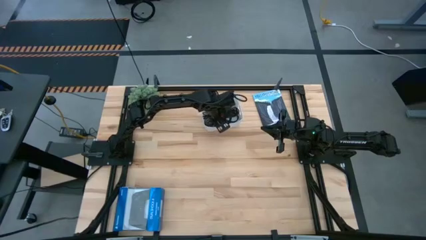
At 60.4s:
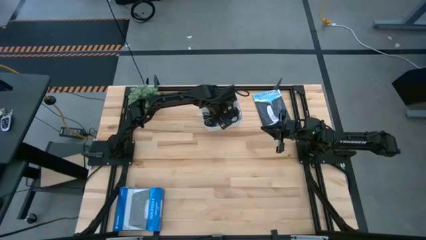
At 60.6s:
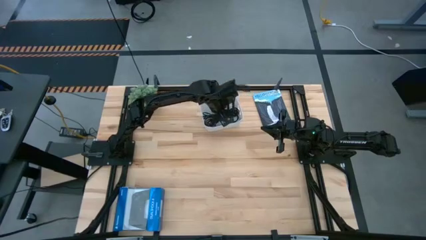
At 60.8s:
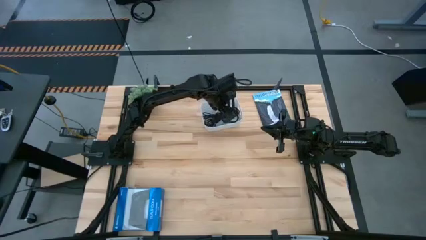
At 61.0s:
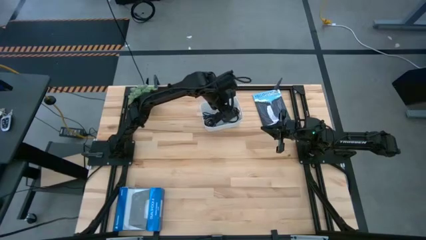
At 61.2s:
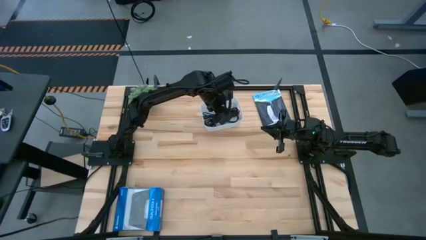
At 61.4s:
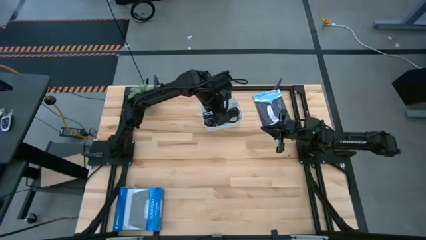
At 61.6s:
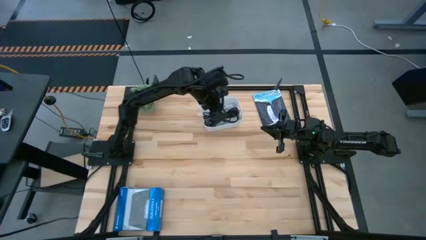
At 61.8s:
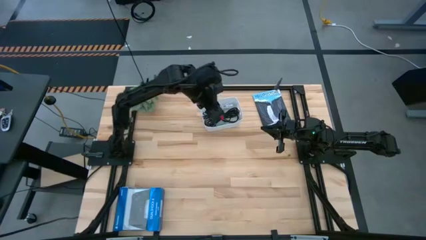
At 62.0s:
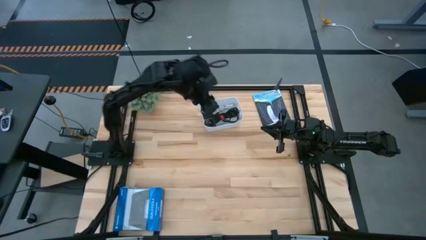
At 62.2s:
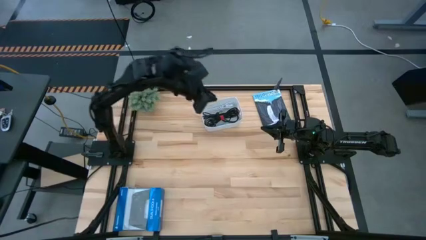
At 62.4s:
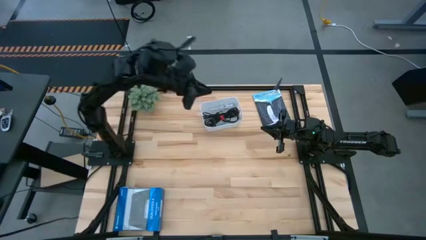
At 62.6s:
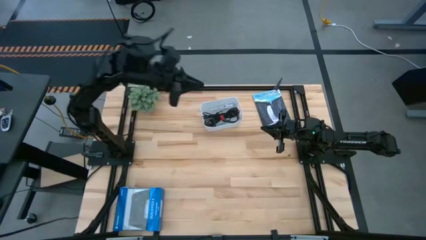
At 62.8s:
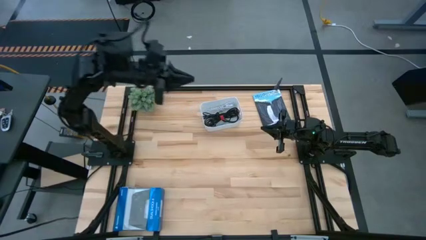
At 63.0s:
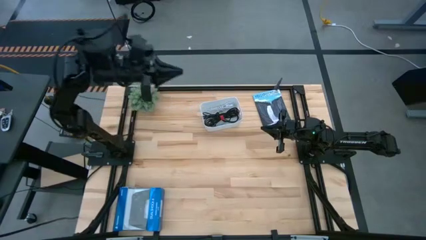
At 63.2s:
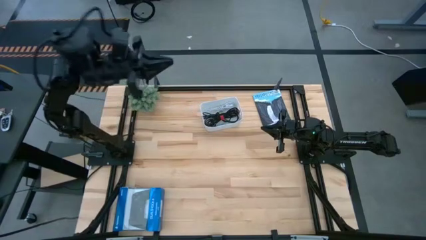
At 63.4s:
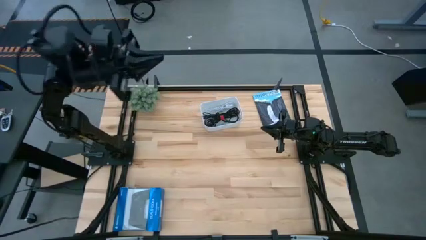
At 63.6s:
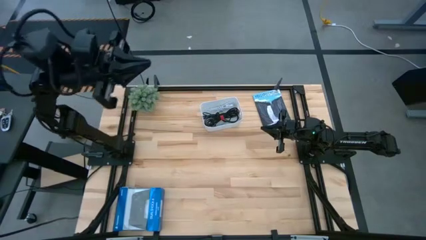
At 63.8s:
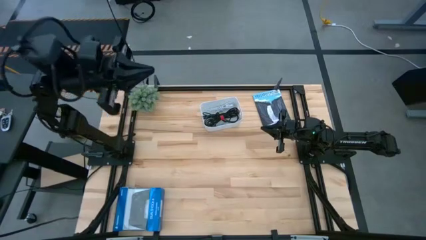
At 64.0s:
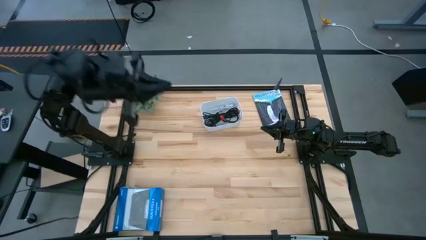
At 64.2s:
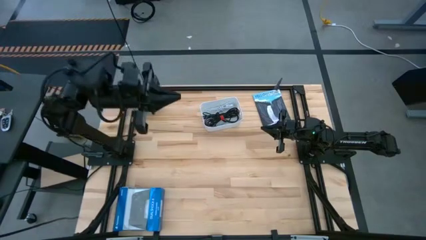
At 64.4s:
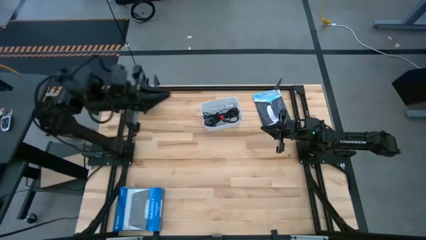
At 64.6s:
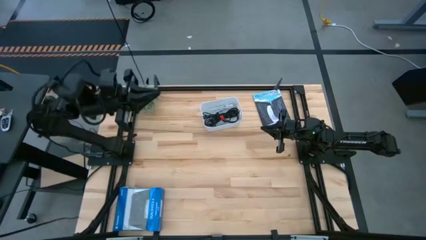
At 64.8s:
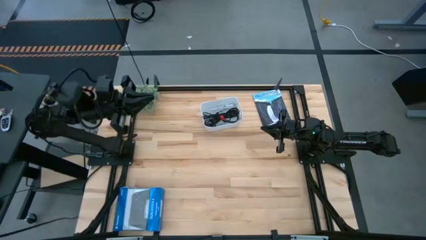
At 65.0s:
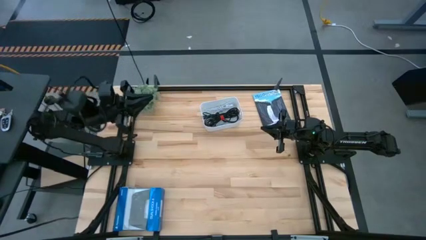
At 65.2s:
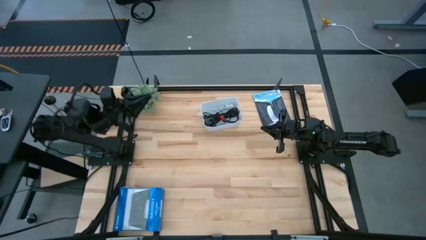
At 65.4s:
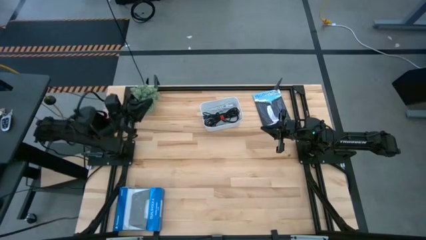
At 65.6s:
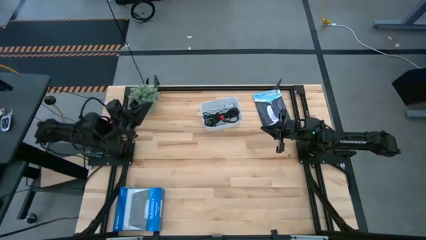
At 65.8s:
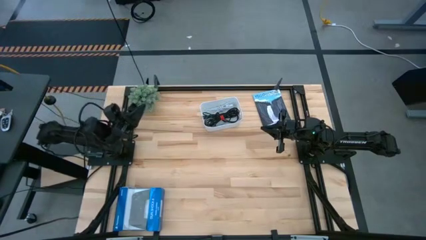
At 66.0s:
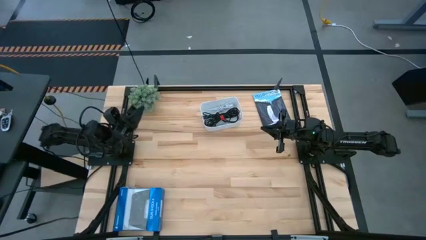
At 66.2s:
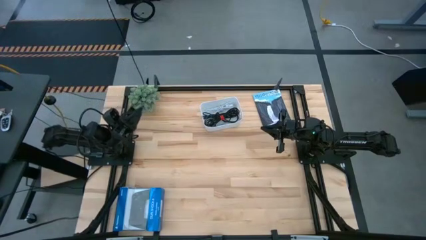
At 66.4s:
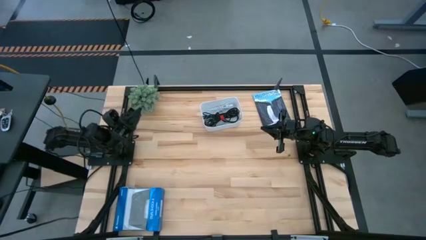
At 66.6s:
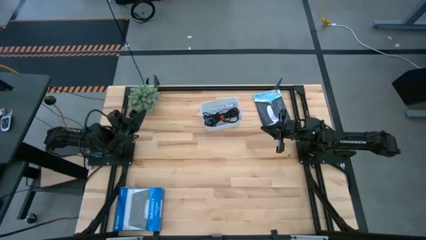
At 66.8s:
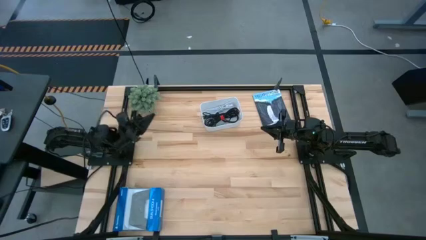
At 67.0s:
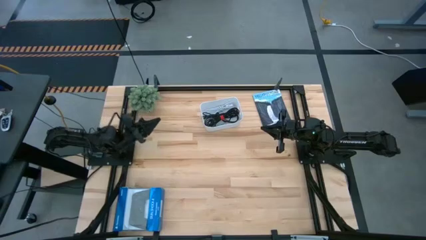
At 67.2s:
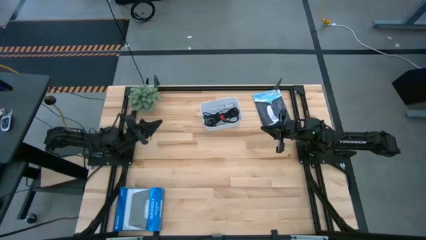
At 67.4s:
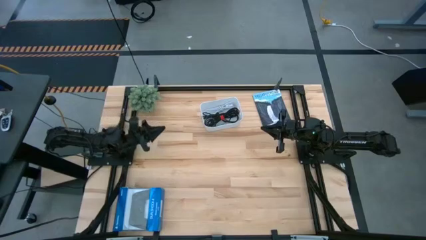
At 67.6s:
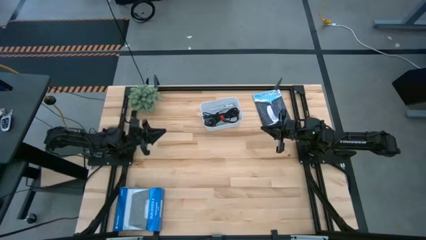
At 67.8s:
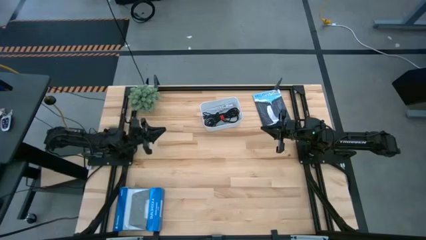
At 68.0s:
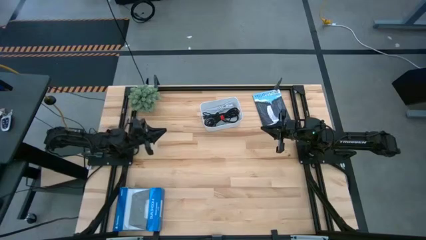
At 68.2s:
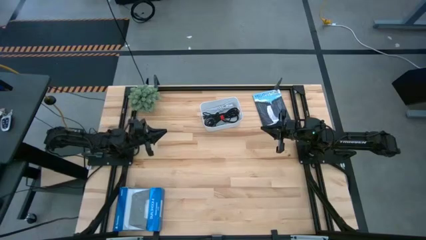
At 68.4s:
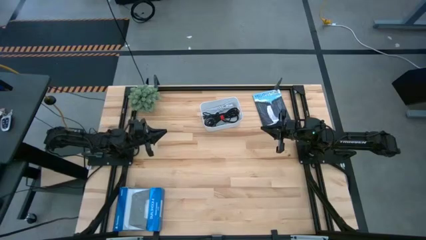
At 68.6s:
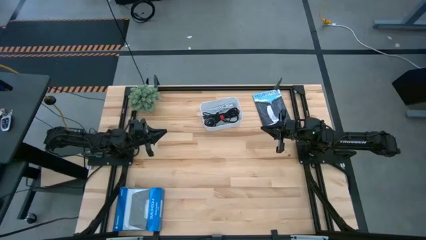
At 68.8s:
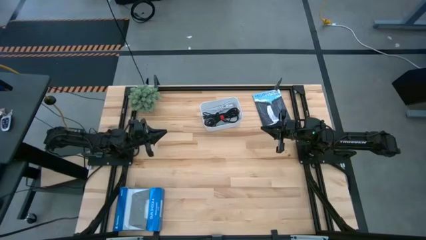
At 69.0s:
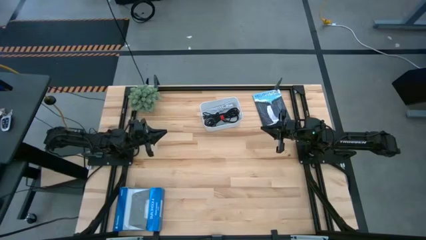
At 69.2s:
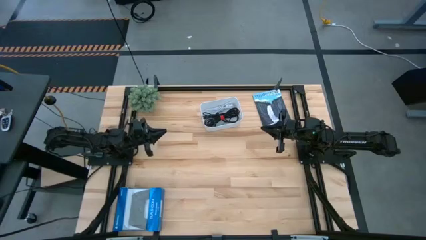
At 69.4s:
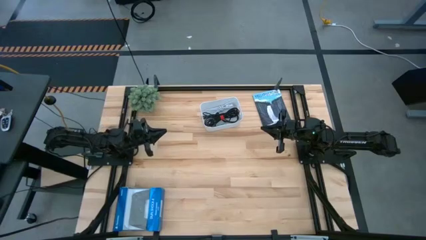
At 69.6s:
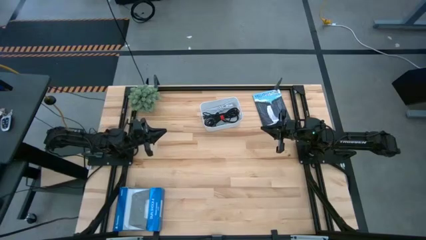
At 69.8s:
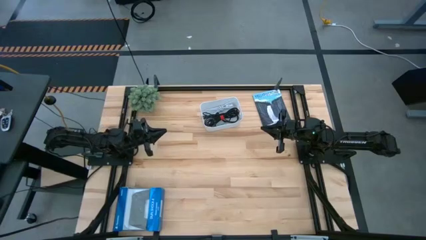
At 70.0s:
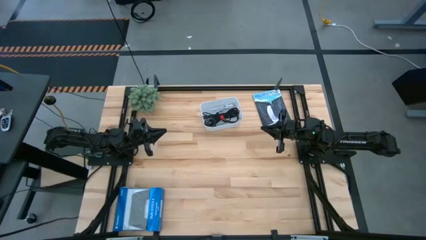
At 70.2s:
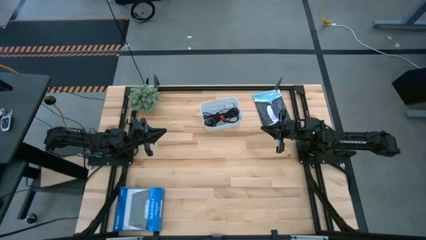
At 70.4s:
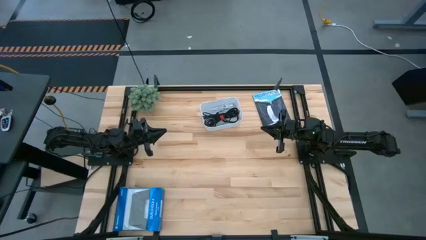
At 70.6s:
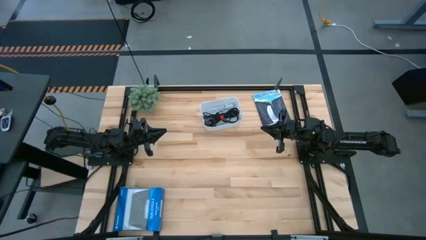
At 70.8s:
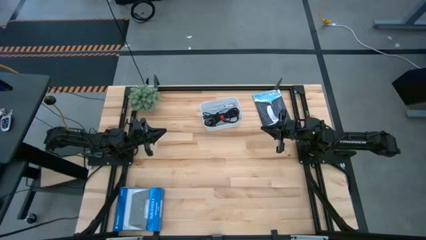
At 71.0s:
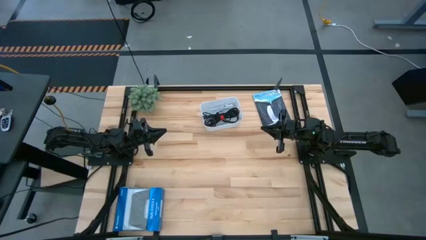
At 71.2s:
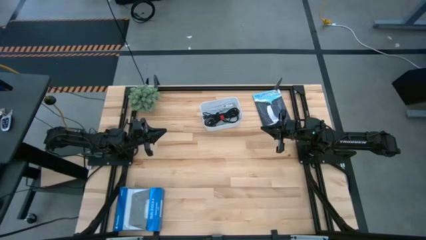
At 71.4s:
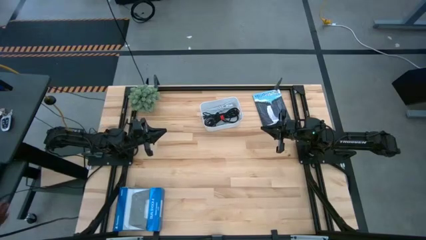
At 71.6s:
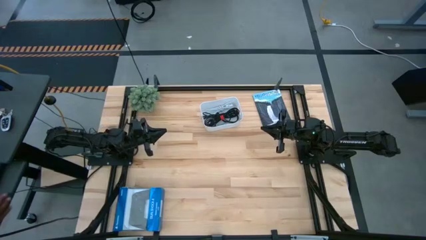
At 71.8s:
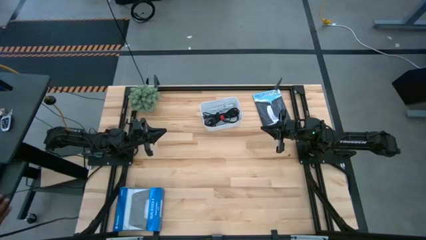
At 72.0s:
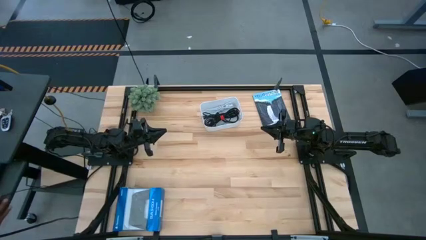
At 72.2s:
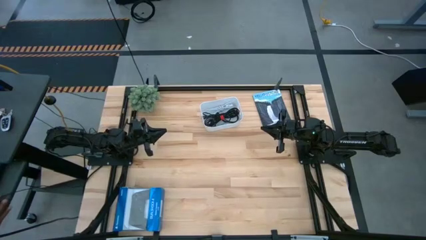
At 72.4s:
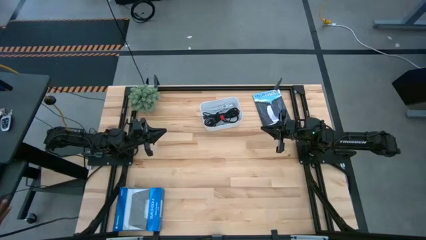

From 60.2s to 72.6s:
Task: Pick and place USB-C Cables
Return to Home Position
